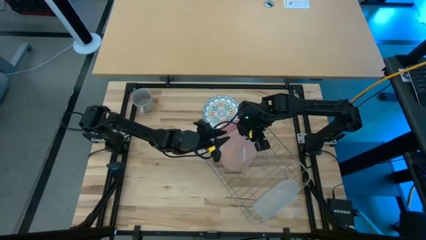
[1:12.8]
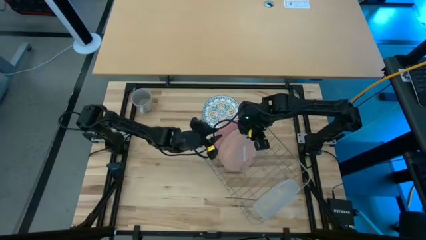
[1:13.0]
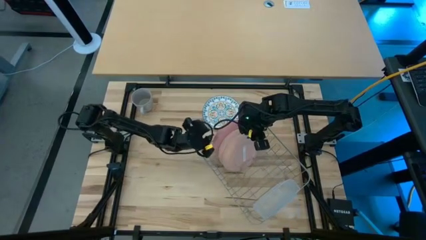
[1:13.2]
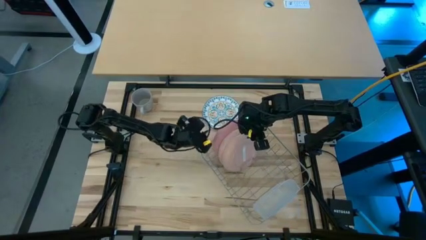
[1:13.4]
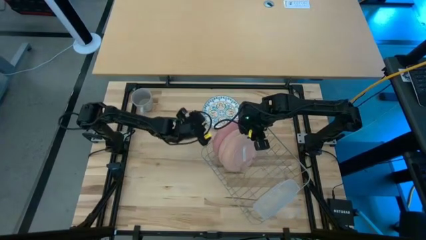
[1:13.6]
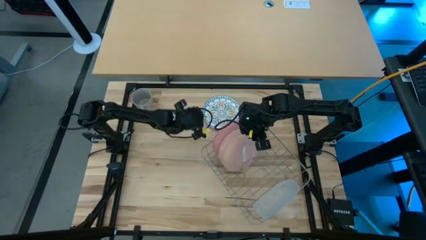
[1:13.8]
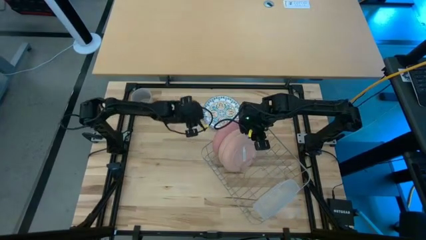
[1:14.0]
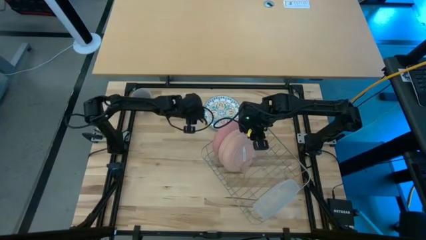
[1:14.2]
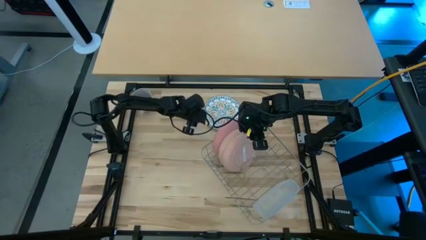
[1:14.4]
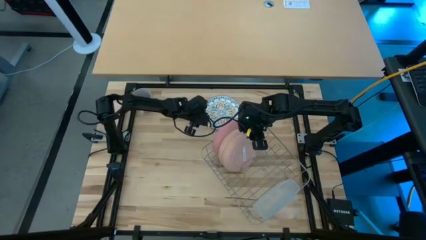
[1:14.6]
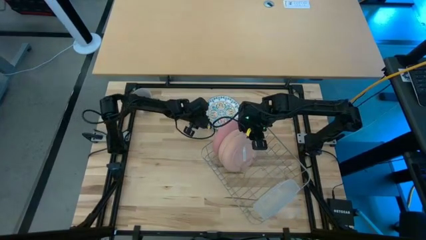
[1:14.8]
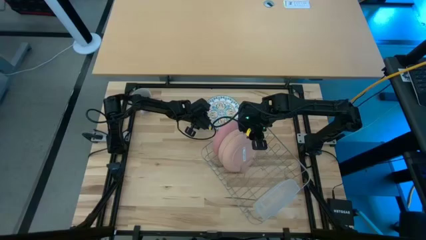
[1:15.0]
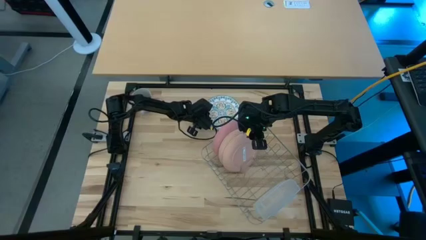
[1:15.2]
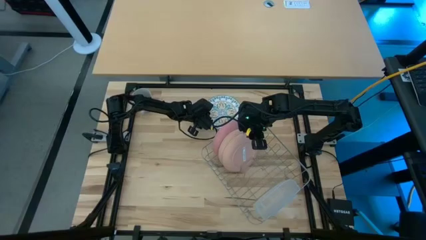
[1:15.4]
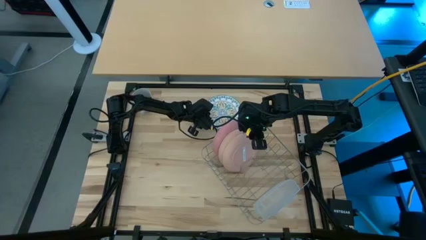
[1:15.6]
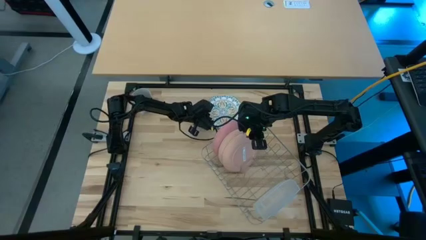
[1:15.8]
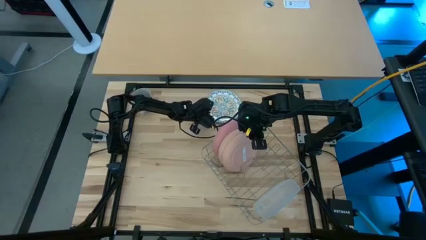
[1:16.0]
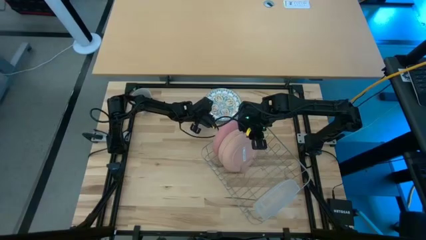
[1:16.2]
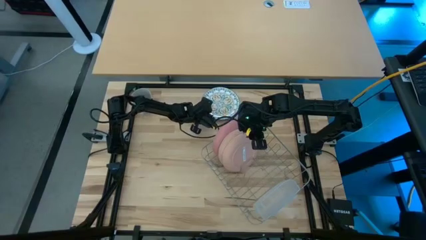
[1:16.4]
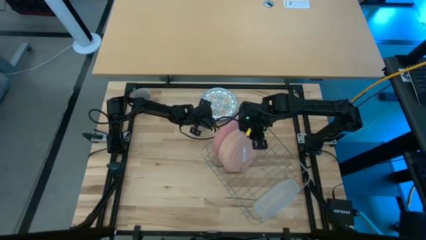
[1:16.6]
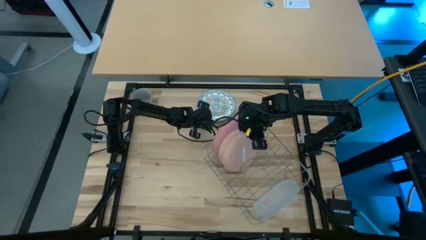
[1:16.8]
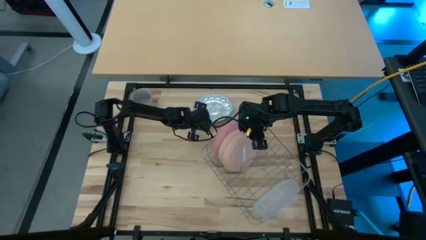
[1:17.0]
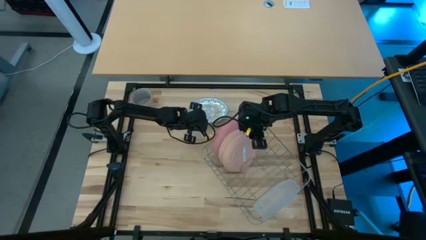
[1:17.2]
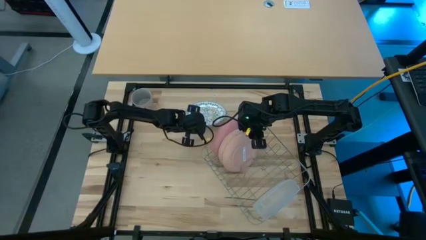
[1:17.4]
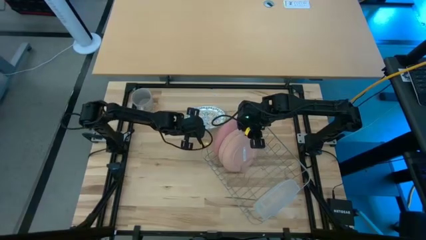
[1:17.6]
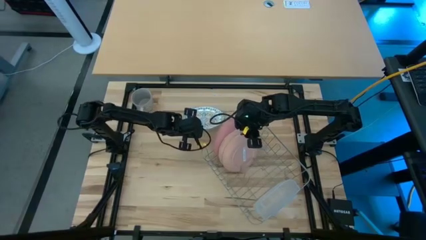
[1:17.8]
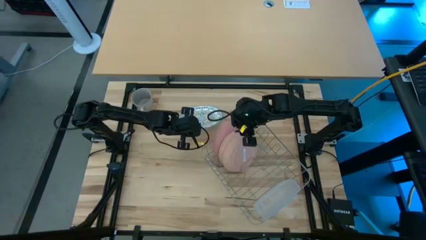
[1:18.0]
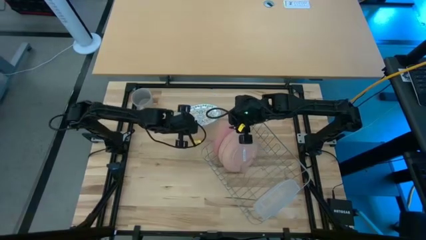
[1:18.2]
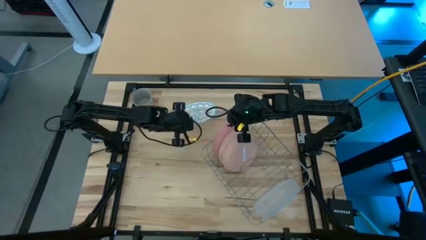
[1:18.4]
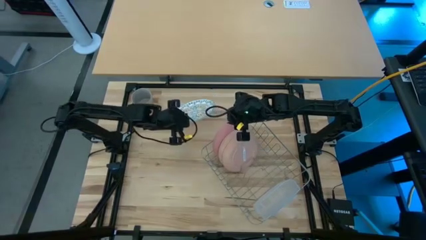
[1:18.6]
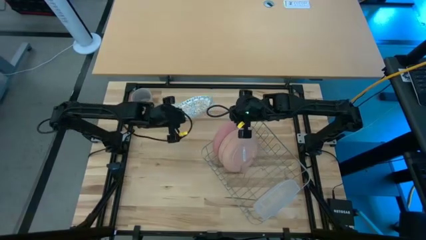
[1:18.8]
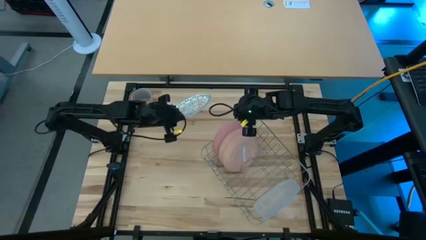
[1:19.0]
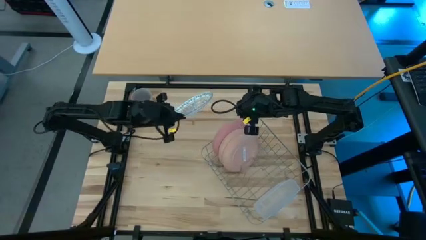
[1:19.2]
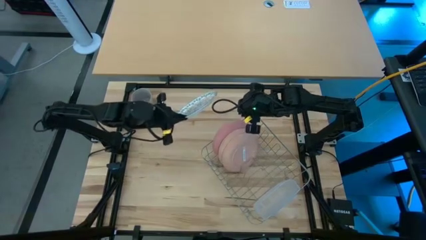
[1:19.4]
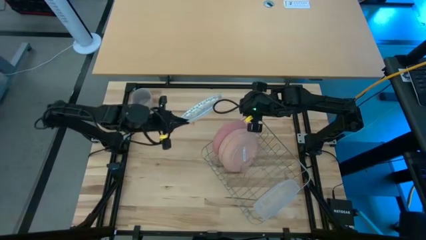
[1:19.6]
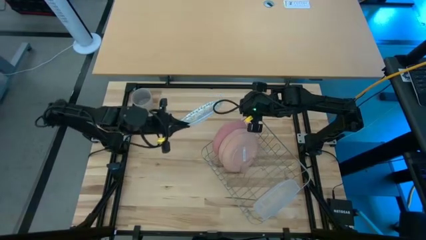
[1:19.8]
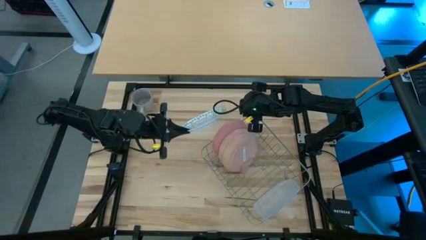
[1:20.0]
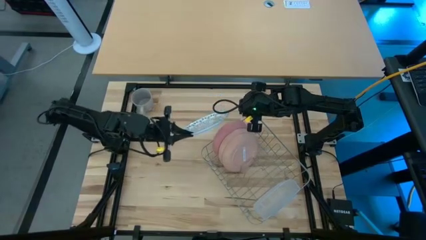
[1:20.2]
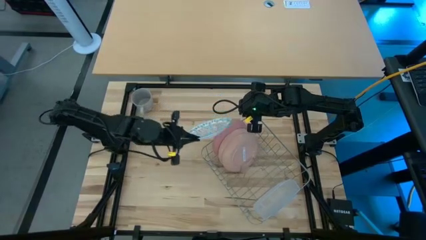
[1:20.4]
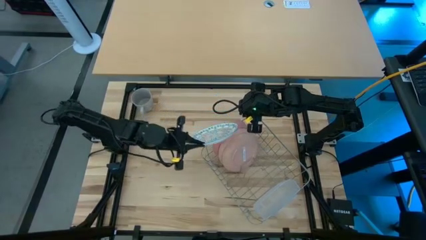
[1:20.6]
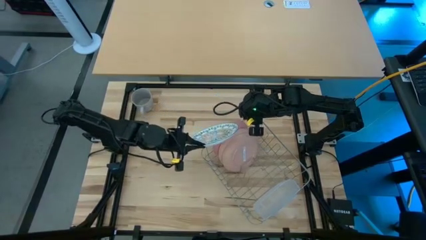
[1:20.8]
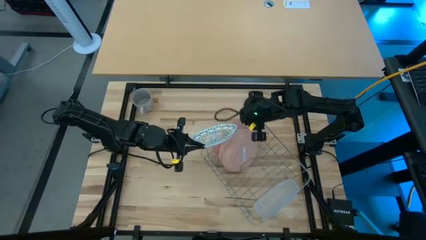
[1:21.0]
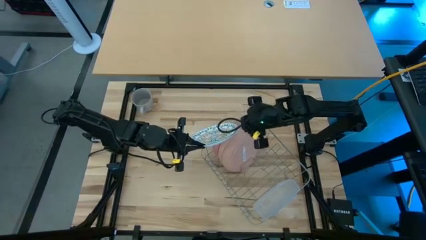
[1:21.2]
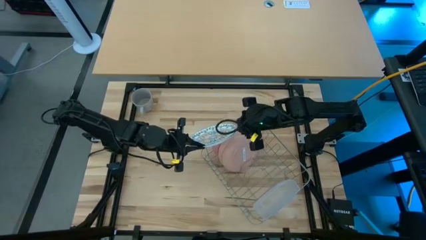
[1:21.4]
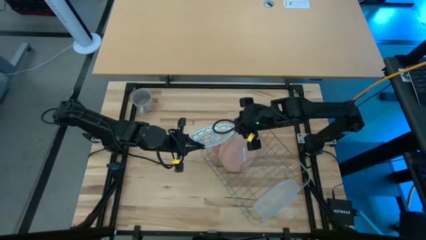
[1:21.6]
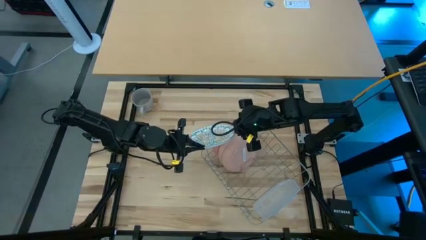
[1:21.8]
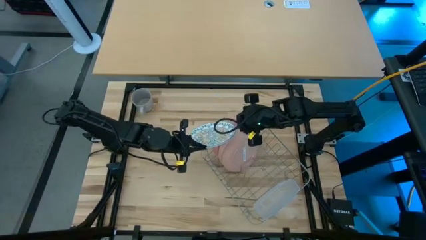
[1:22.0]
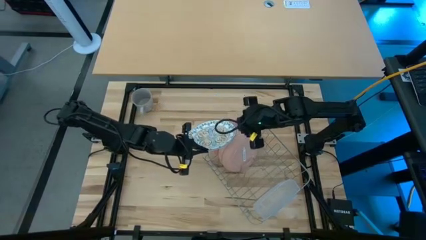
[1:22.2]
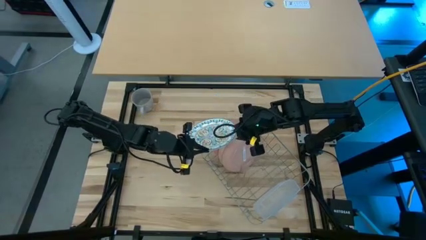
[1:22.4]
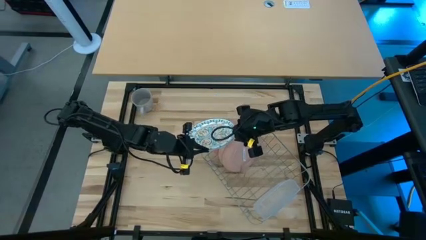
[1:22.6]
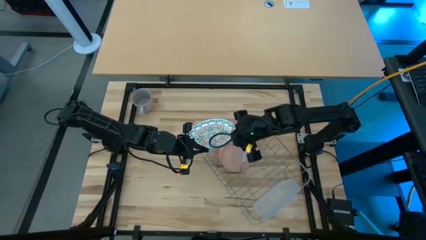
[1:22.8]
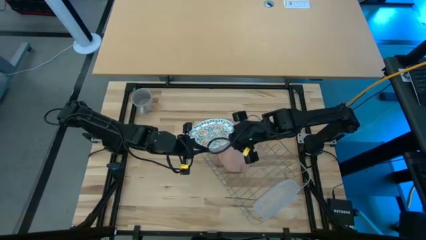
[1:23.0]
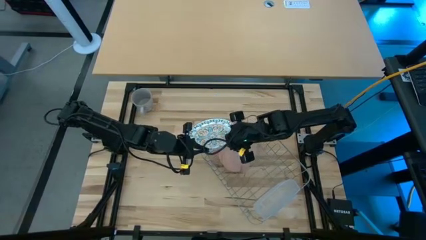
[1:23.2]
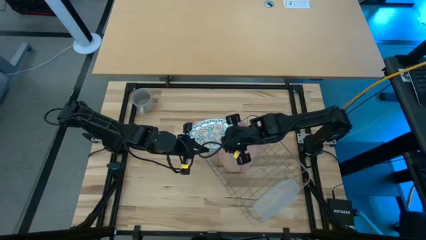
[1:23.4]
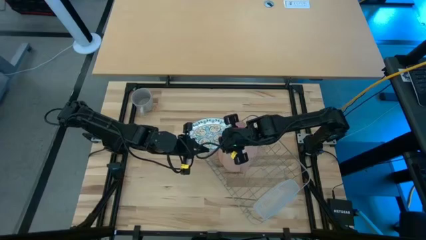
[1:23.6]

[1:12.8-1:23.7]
Task: Sort dishes
Put the white plate into the dish rack

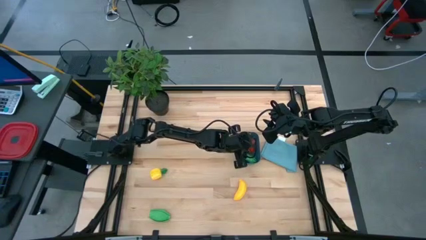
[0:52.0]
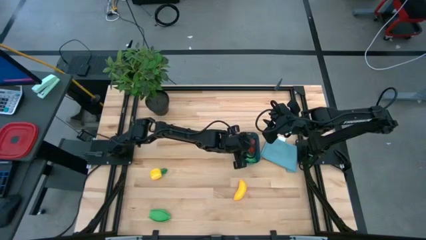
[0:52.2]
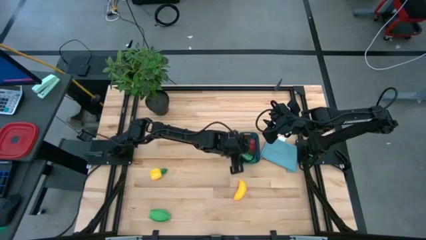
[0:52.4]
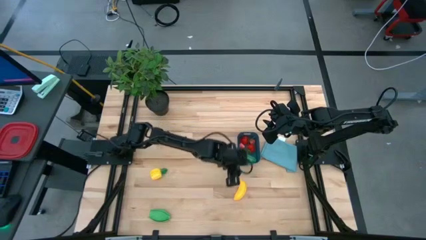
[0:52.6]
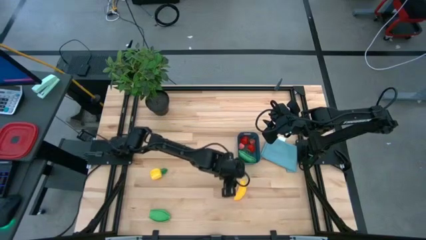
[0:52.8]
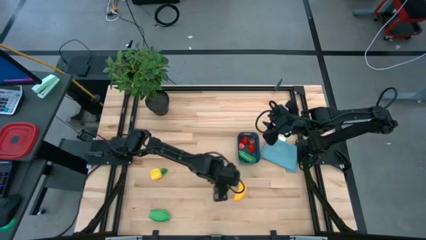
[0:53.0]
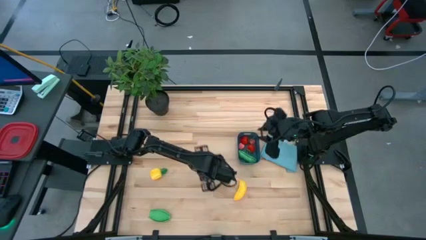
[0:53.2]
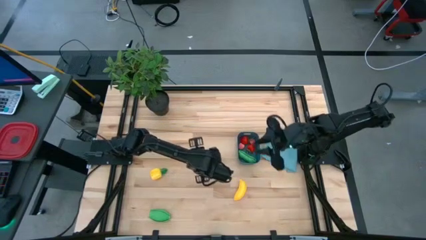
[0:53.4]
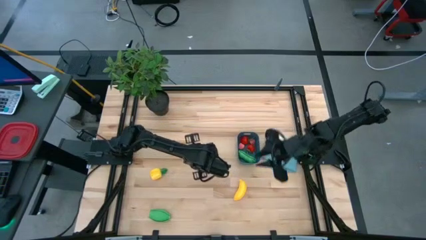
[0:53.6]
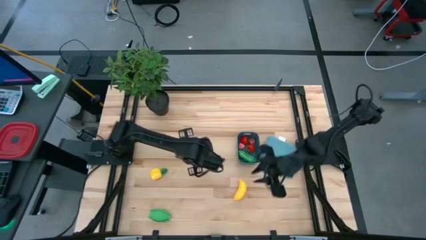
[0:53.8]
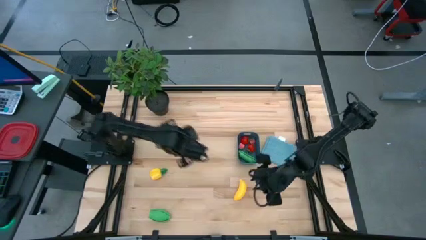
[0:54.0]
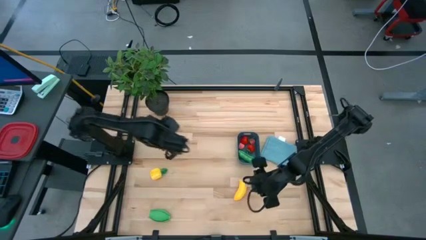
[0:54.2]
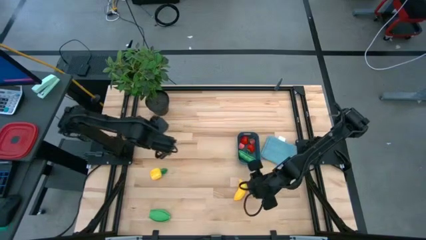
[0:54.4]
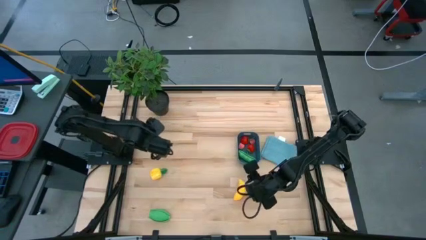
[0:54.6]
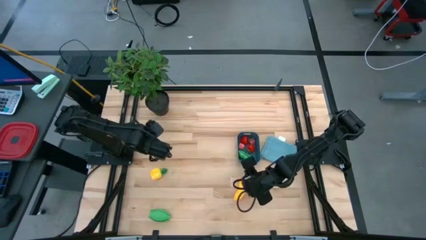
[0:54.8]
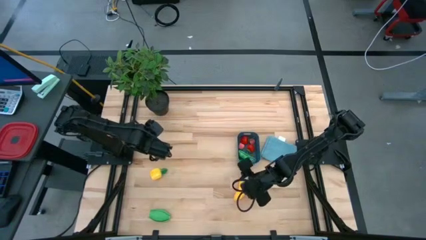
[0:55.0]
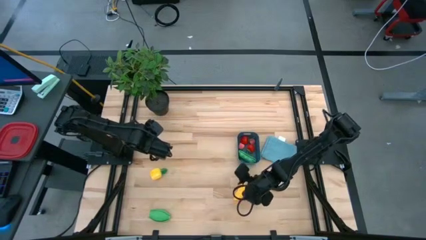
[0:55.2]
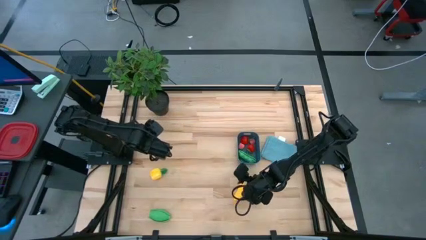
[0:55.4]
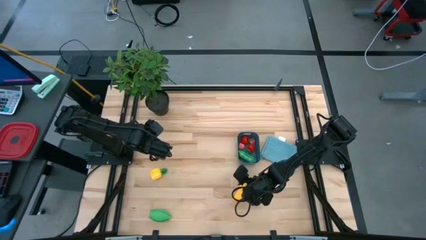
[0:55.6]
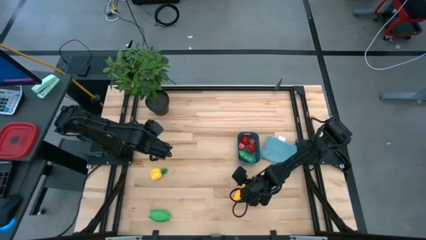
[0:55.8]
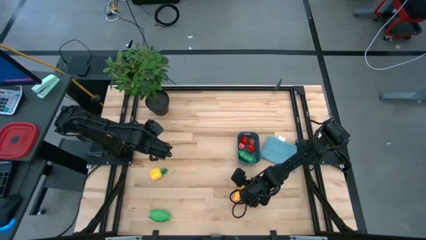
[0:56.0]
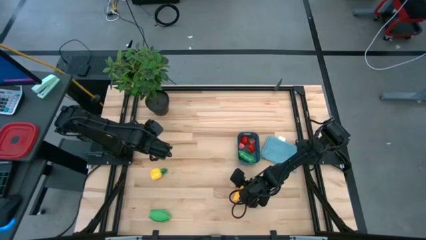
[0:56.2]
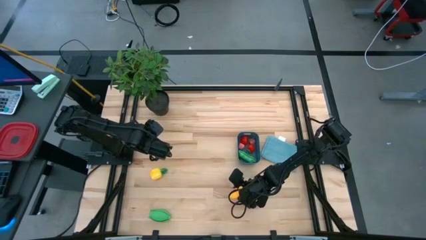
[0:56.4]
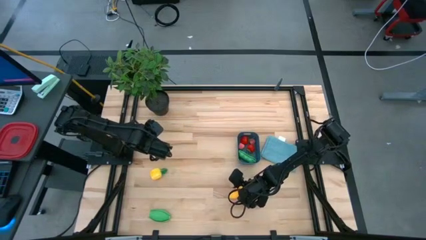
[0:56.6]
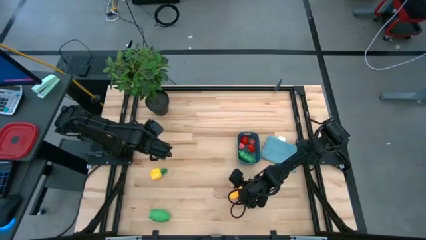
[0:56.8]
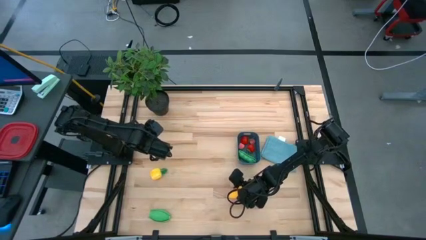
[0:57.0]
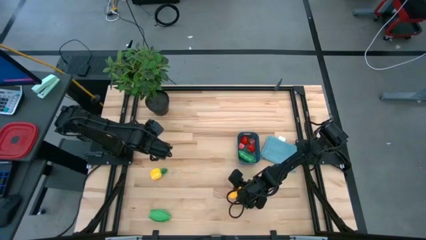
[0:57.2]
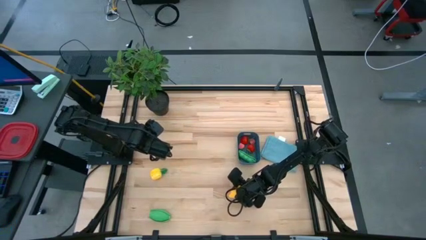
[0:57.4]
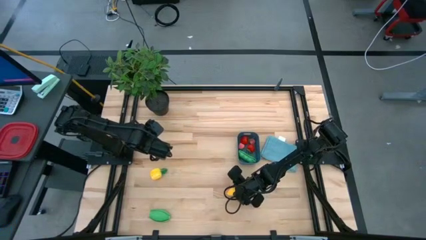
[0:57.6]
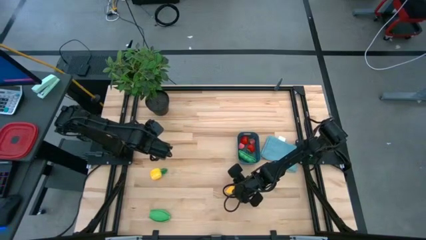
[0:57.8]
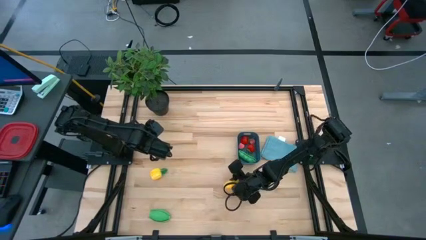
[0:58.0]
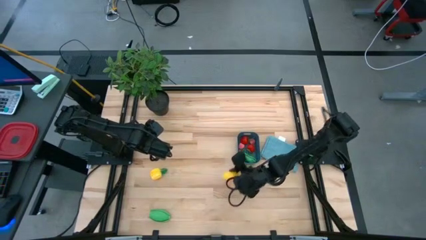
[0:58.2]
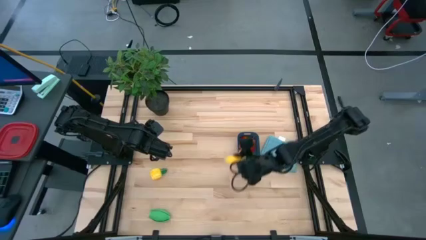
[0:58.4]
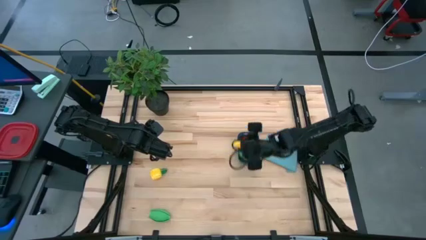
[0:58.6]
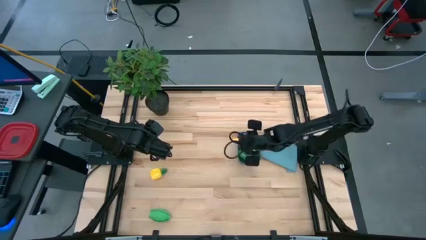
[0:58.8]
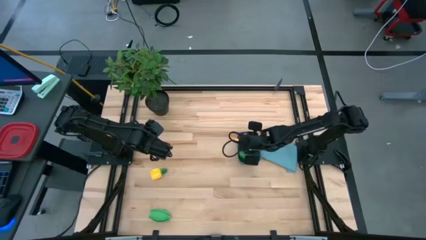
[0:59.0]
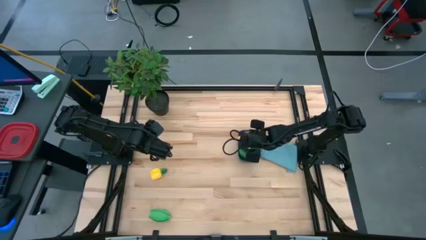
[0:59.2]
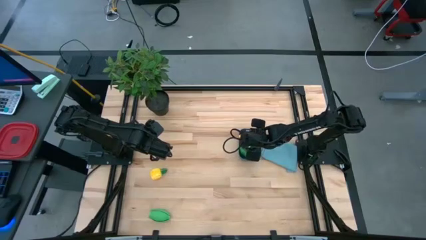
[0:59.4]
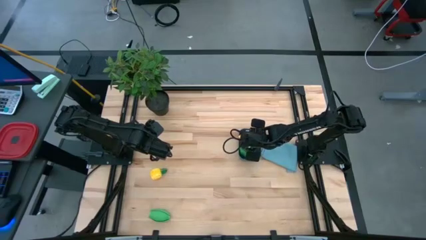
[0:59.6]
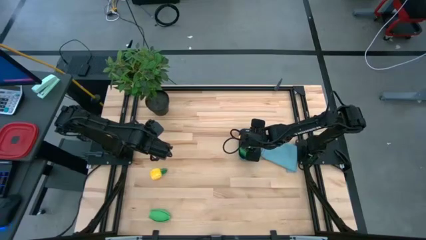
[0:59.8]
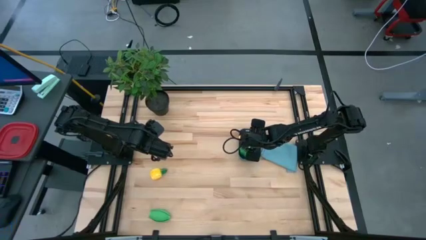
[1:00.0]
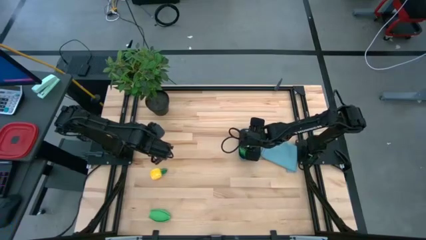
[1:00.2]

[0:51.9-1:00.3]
Task: Pick and placing Produce into tupperware
Put the yellow banana into the blue bin
